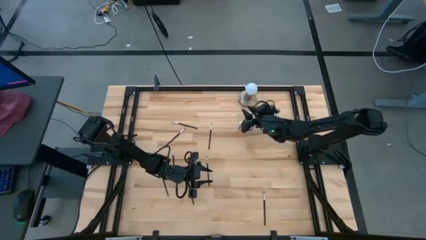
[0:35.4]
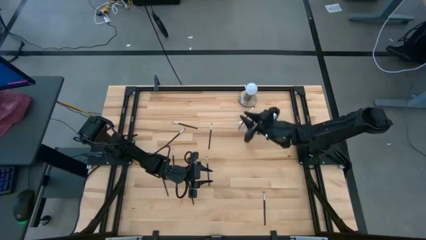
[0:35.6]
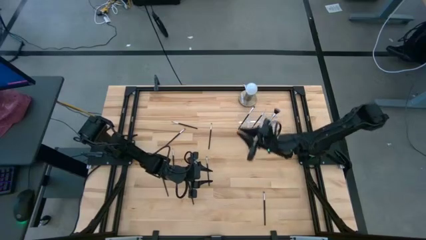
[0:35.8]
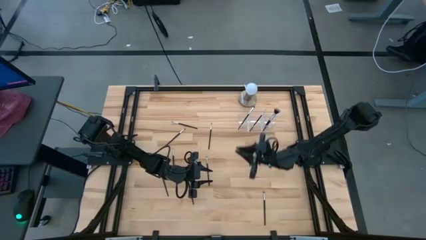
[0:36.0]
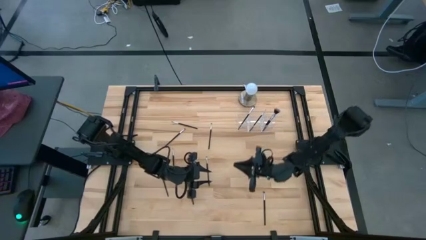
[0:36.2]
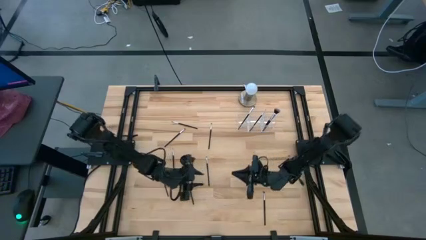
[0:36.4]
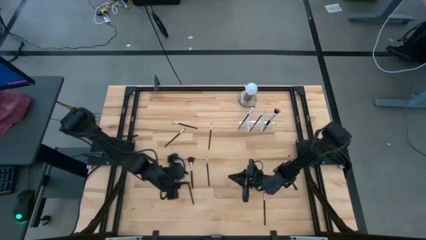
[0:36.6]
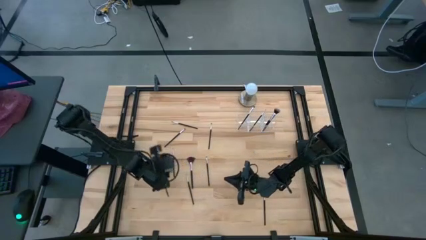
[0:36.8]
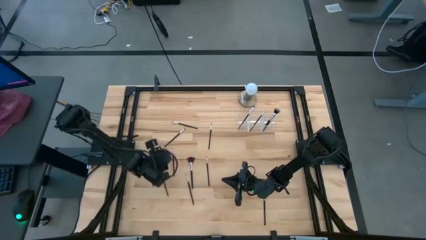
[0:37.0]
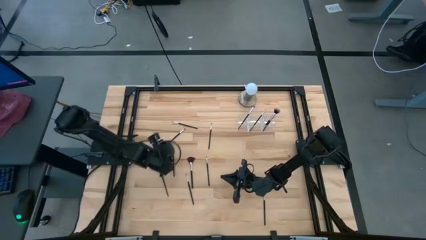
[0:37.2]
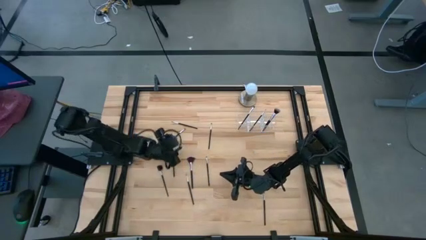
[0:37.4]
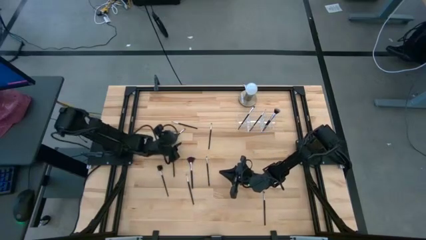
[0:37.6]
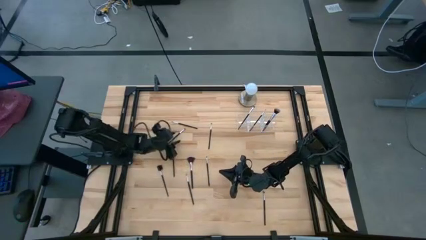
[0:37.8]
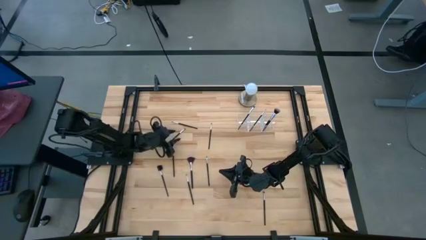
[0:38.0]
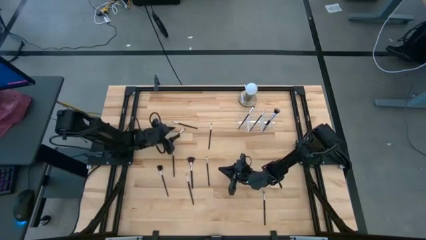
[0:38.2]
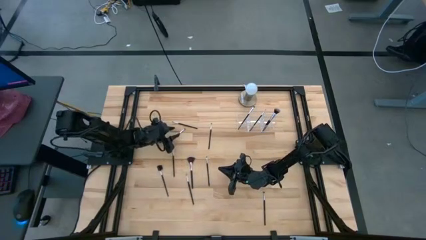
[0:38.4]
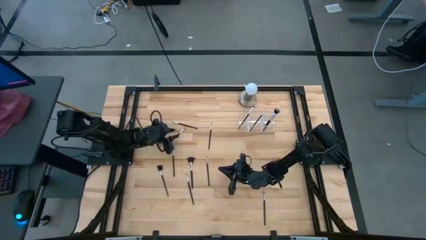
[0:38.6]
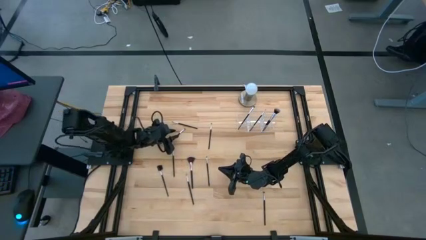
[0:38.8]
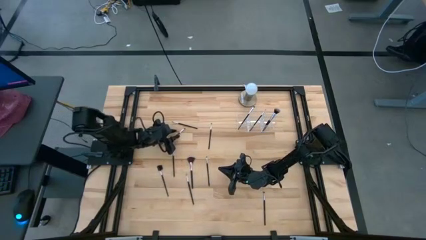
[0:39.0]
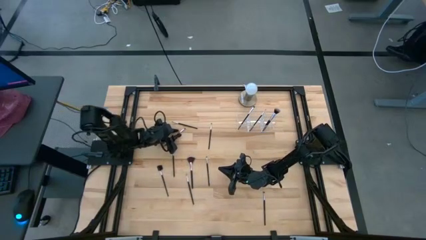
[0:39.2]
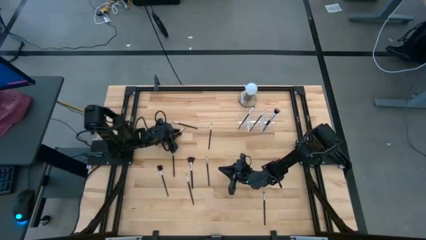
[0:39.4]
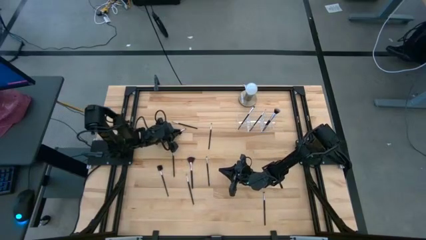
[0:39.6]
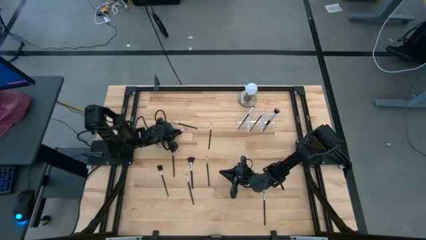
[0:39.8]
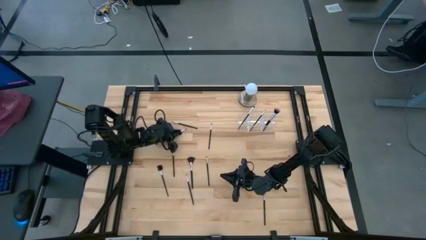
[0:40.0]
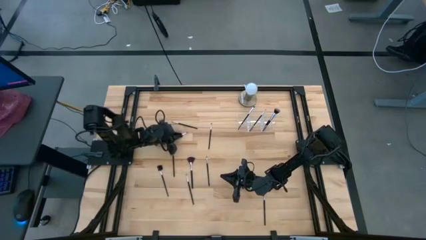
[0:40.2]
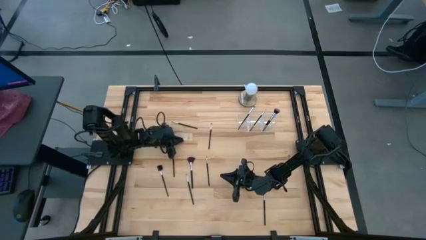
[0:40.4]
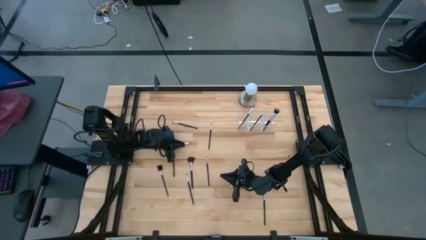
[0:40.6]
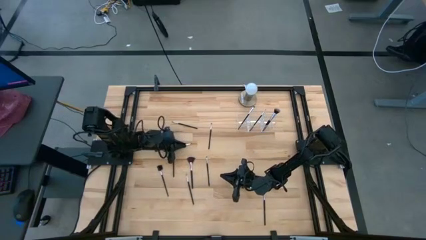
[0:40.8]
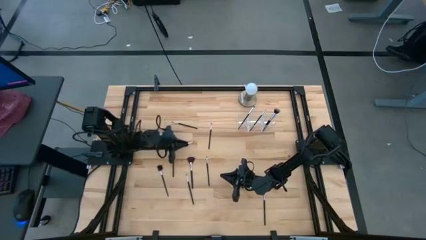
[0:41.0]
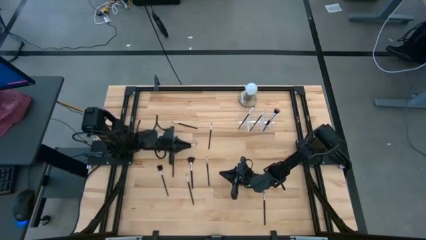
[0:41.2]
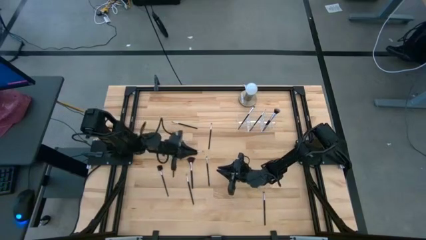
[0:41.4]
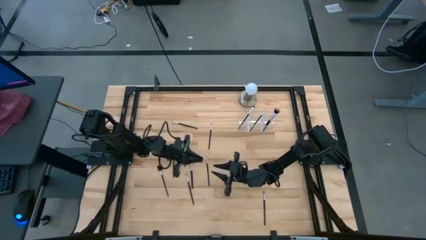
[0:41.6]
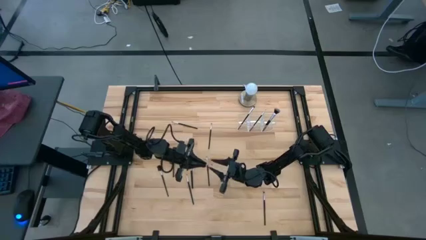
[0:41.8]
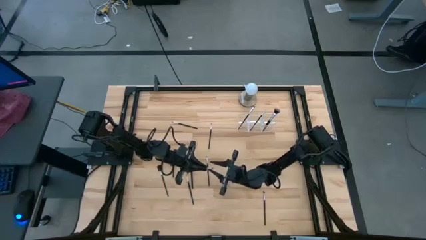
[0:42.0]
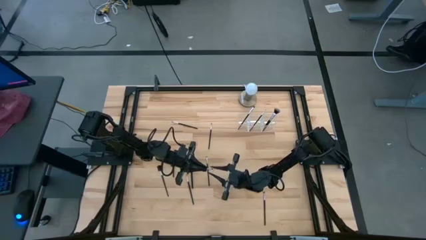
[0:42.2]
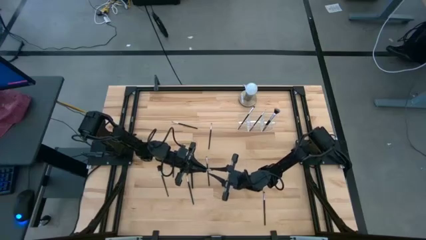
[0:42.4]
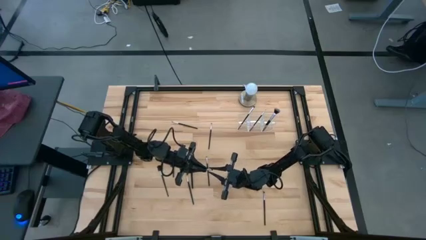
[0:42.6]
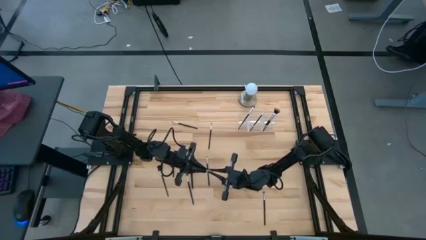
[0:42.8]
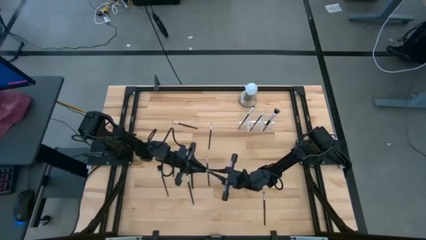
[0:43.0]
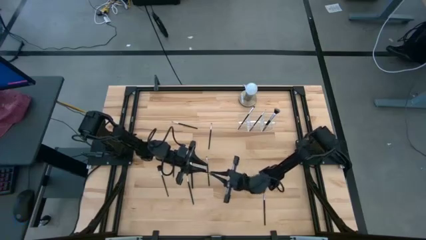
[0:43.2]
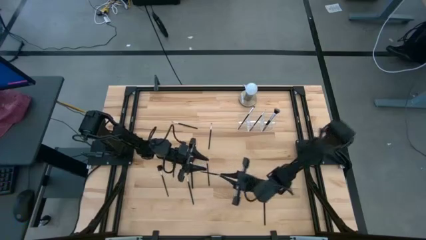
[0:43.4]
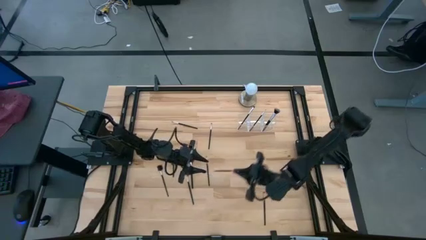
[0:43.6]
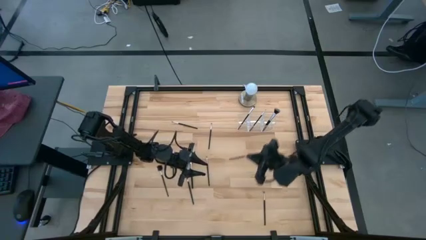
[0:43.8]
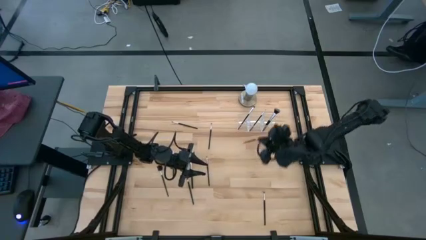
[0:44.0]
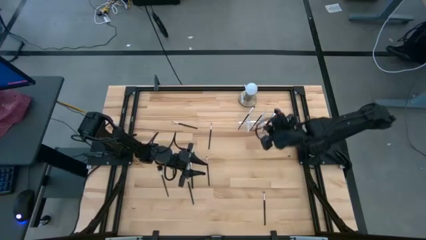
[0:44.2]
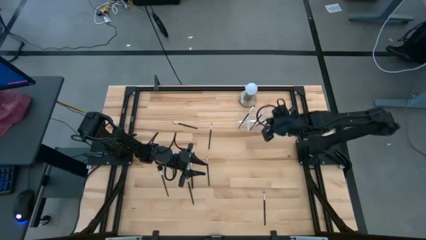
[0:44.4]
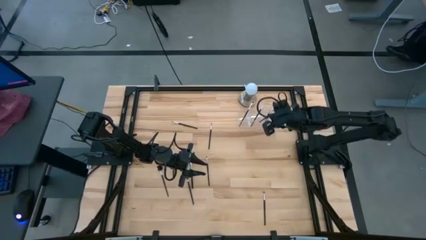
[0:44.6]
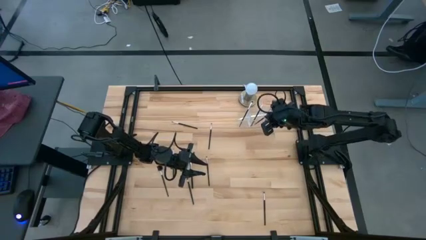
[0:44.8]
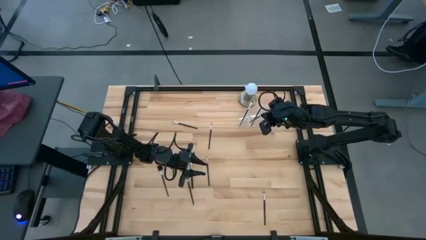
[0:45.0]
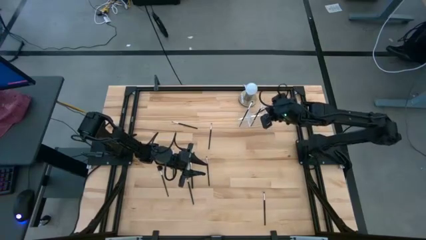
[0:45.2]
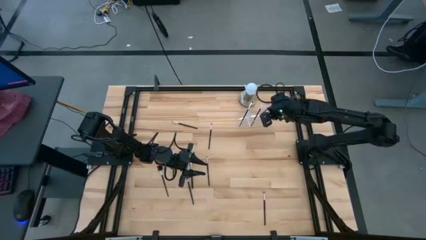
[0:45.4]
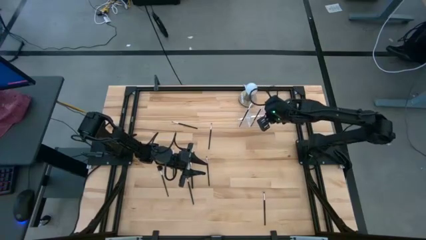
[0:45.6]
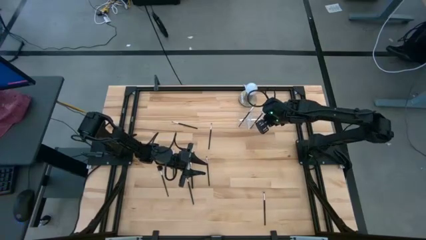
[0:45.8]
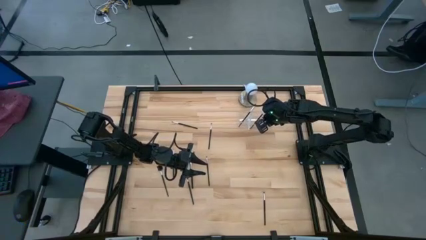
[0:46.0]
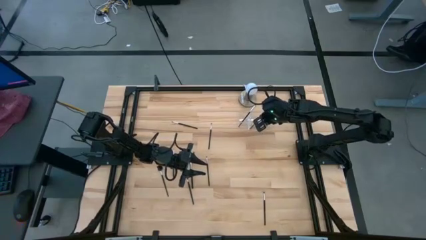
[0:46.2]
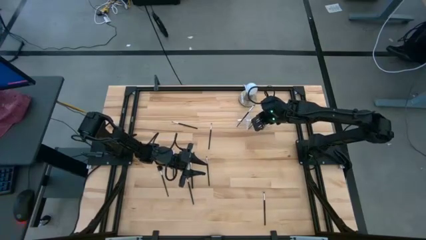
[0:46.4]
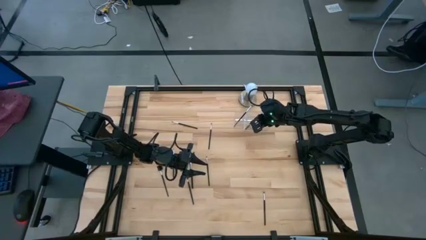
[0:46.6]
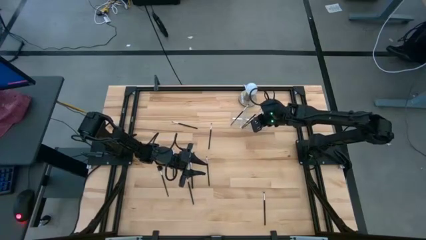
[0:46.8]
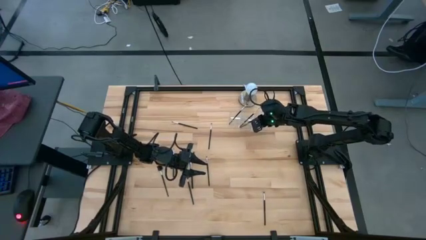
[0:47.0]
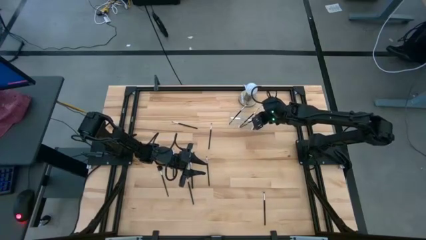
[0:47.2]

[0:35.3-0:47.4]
Task: Put items in baskets/containers
Put the eyeshadow brush into the transparent organizer

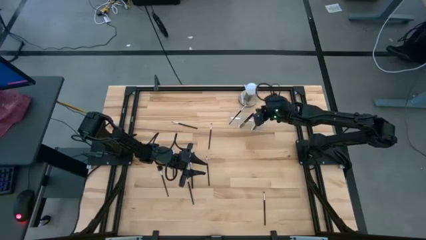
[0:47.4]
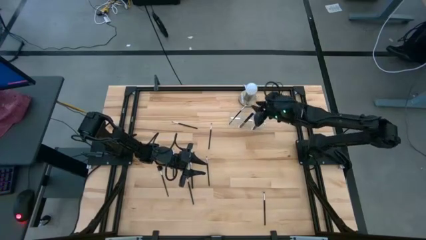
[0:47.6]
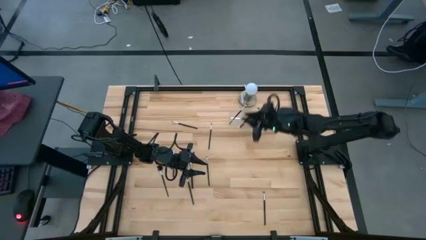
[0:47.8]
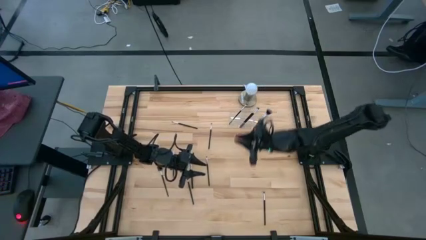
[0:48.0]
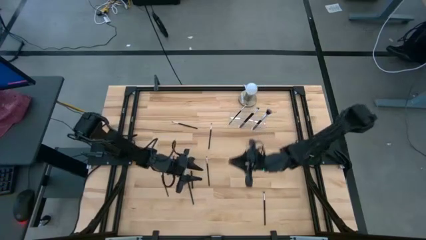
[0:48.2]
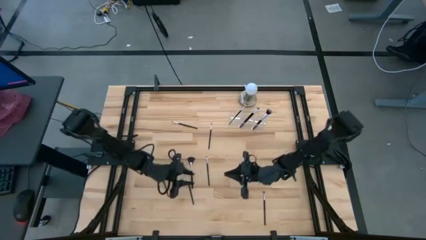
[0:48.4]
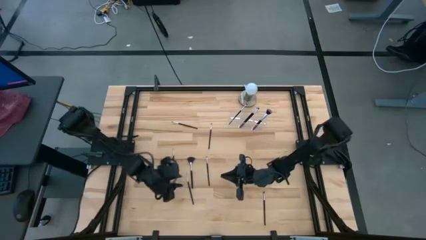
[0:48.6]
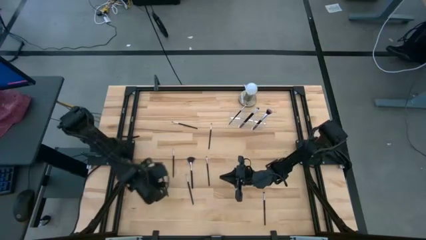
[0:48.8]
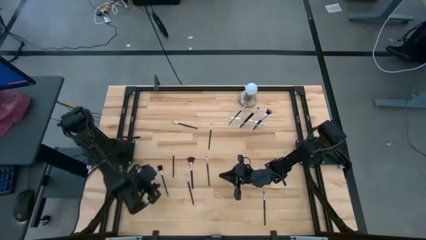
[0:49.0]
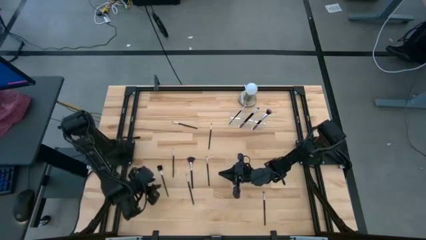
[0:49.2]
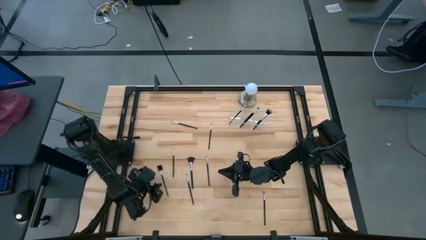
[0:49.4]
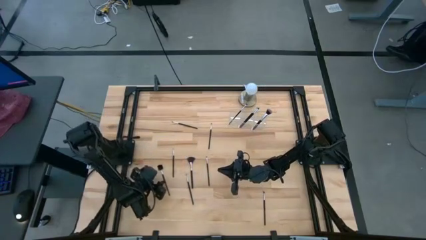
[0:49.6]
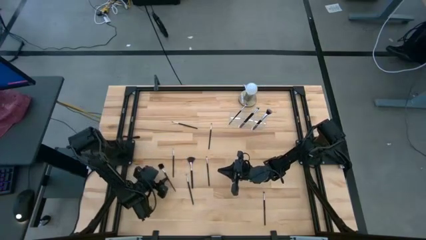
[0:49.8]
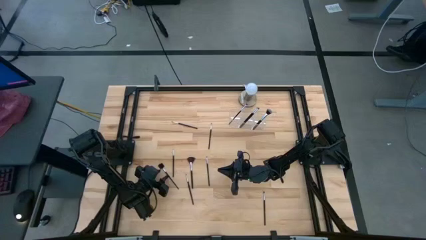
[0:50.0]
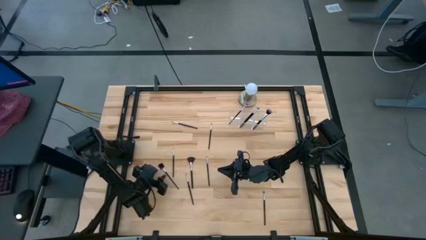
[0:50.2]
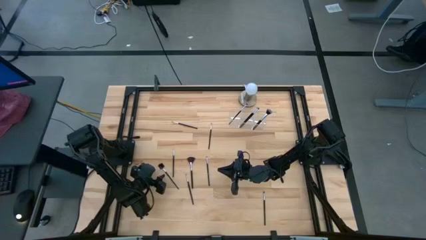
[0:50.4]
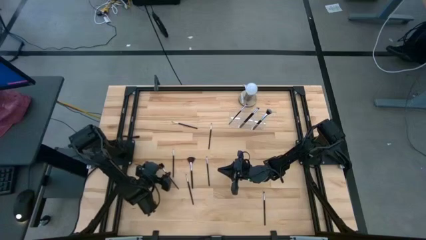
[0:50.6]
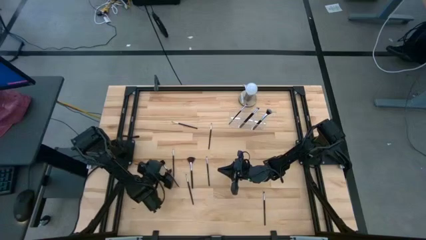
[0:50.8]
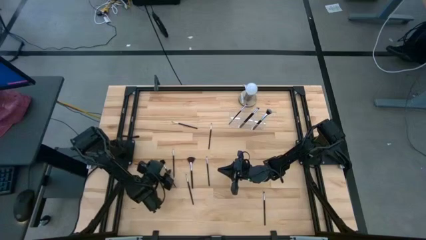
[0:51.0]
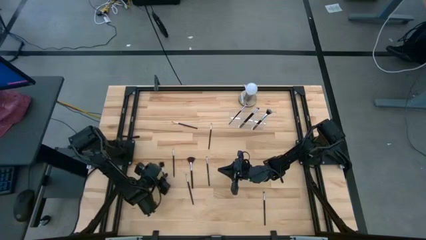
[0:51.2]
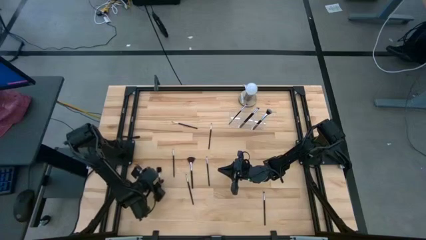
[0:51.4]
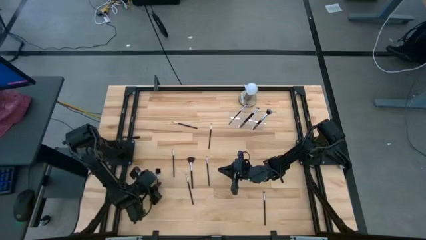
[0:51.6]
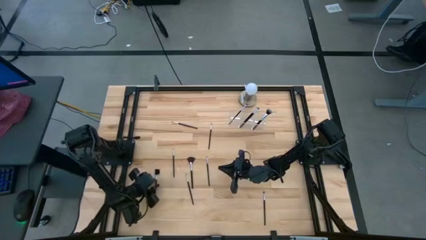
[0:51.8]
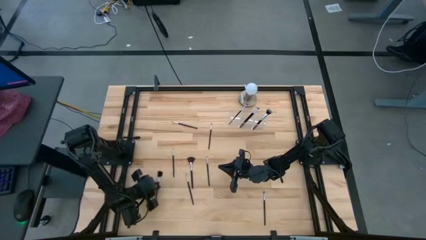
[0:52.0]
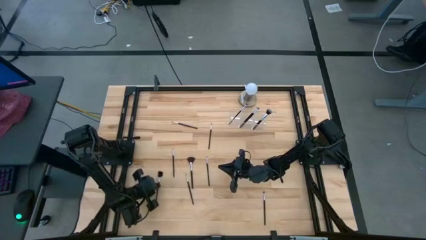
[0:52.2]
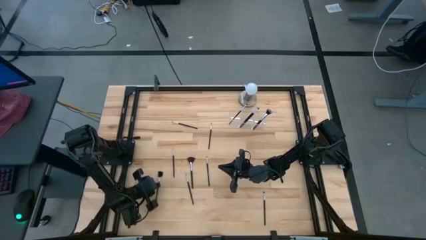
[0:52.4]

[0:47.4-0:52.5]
Put the eye groomer brush into the transparent organizer
